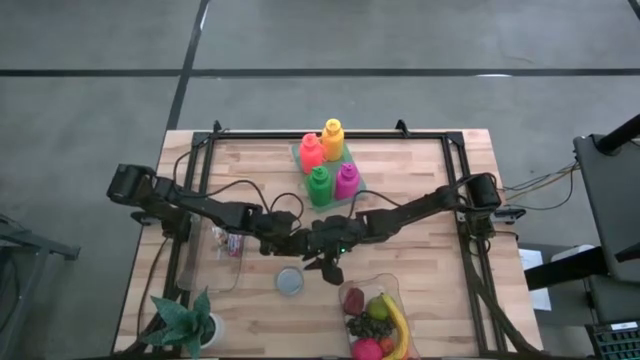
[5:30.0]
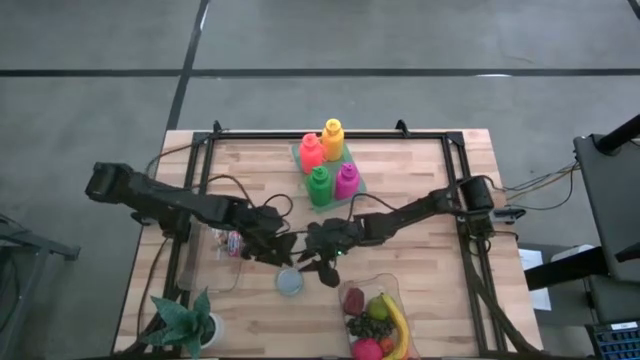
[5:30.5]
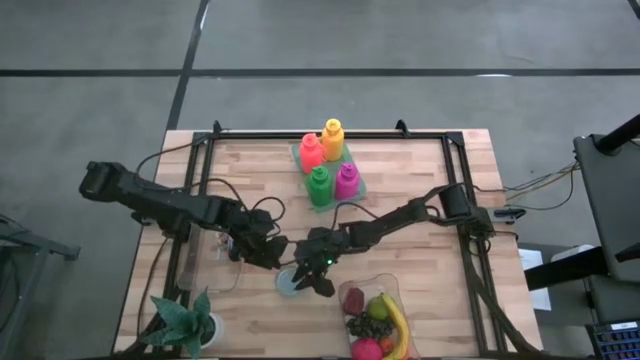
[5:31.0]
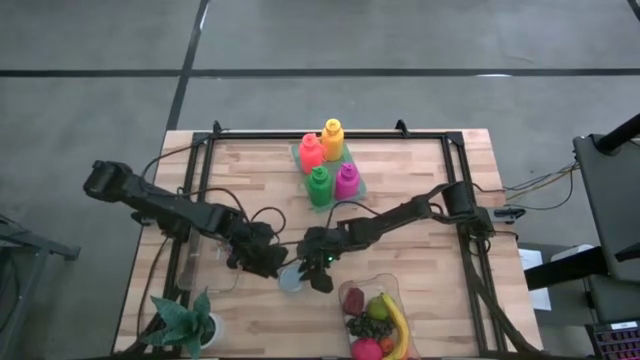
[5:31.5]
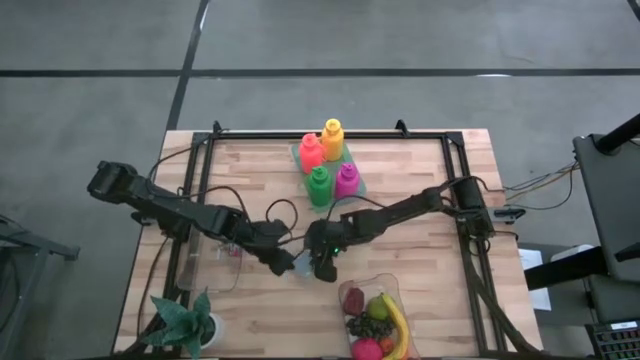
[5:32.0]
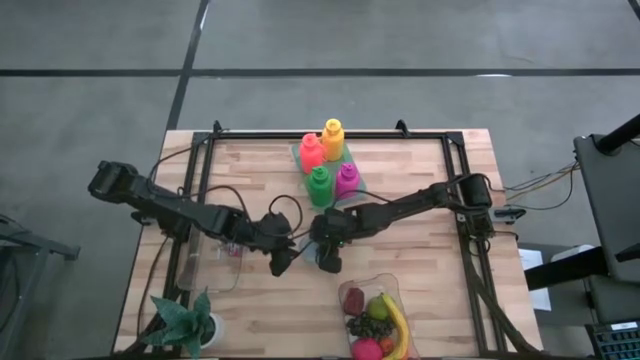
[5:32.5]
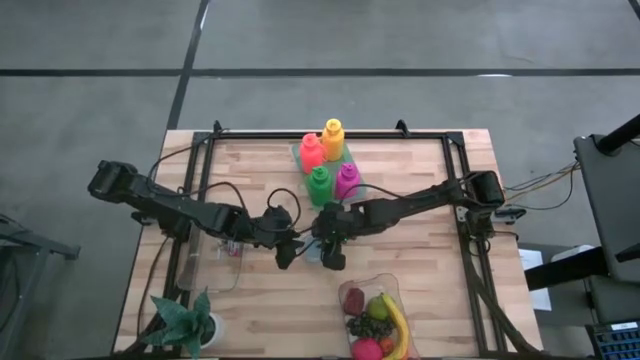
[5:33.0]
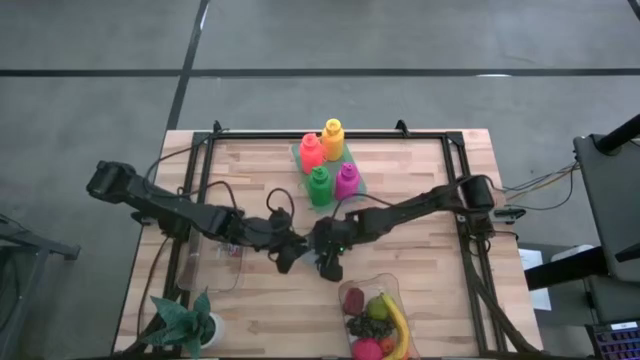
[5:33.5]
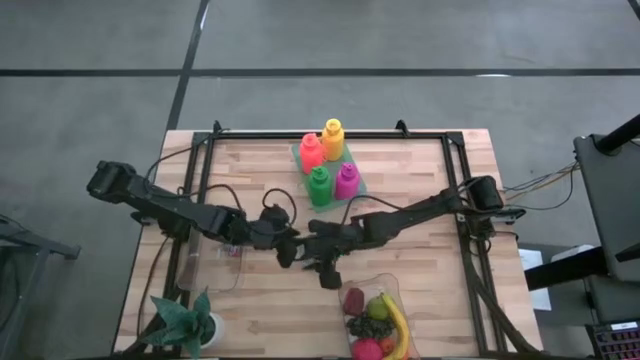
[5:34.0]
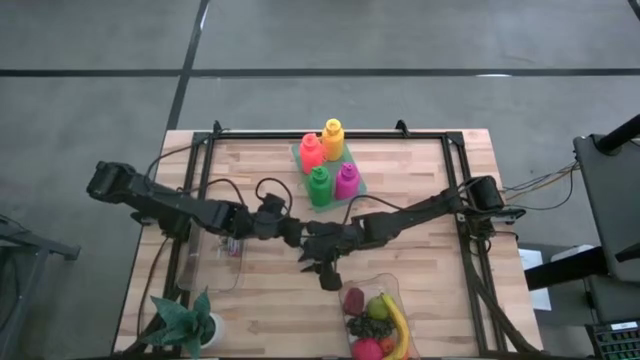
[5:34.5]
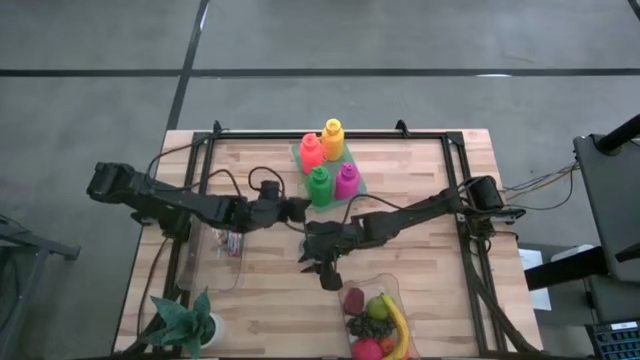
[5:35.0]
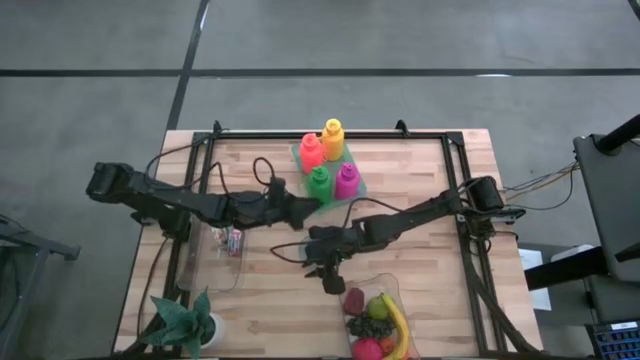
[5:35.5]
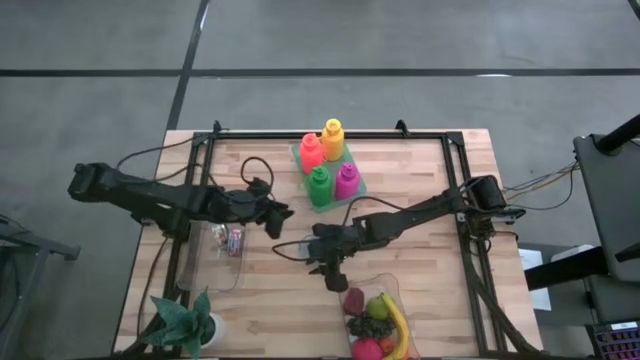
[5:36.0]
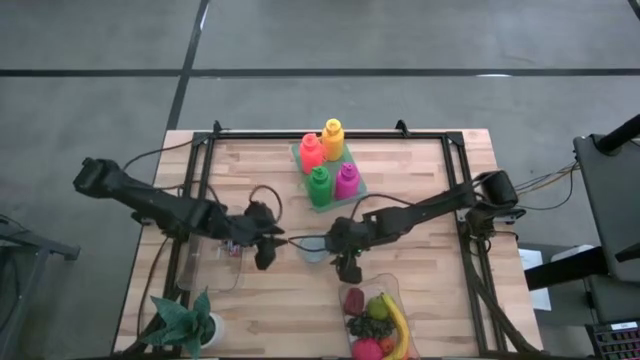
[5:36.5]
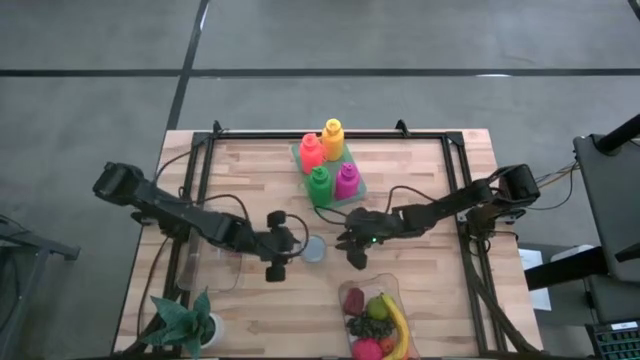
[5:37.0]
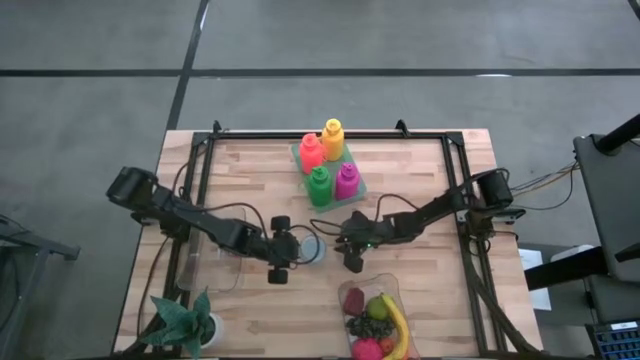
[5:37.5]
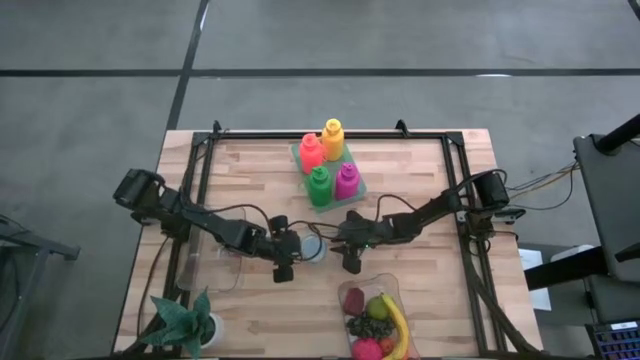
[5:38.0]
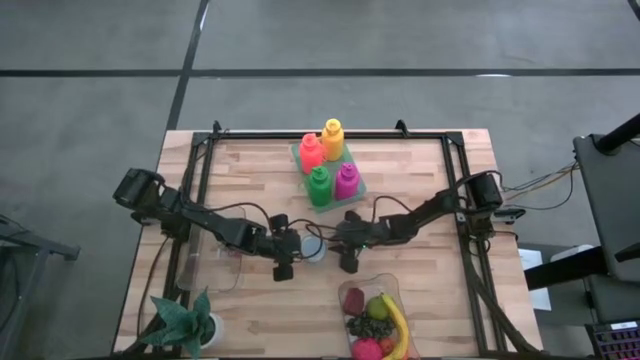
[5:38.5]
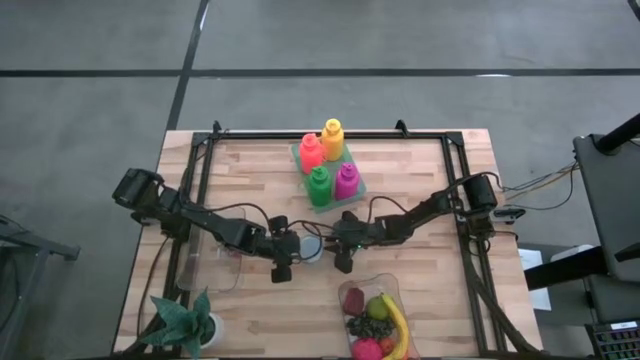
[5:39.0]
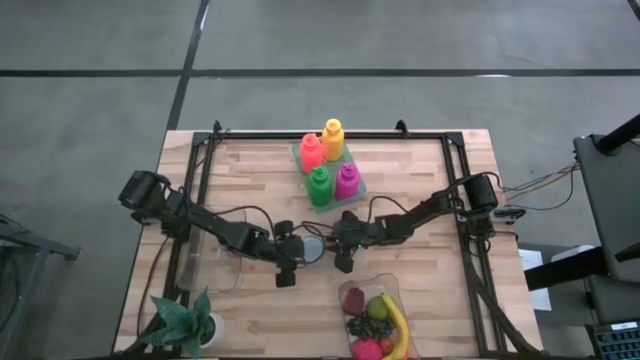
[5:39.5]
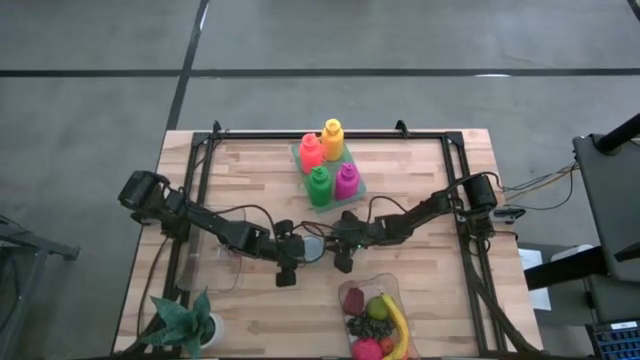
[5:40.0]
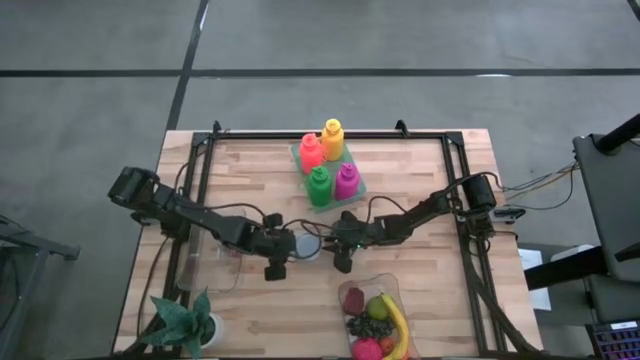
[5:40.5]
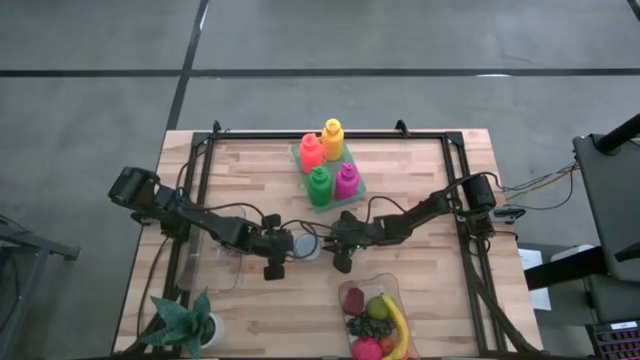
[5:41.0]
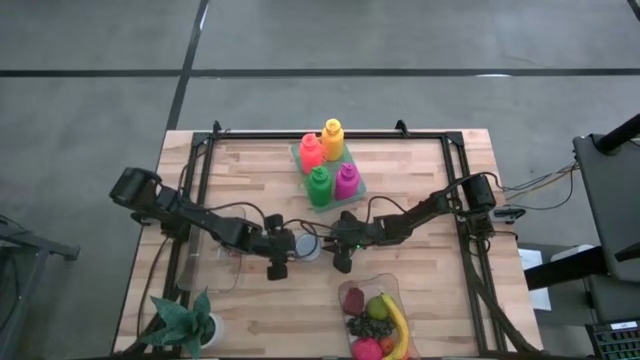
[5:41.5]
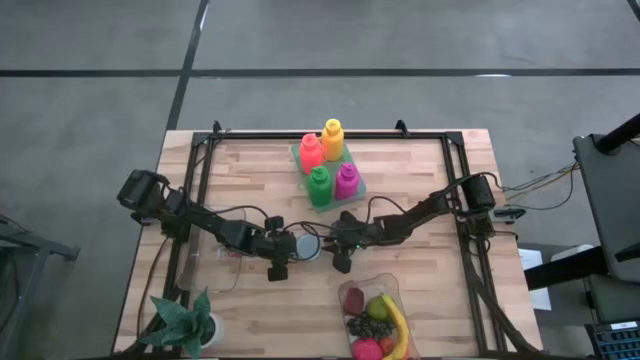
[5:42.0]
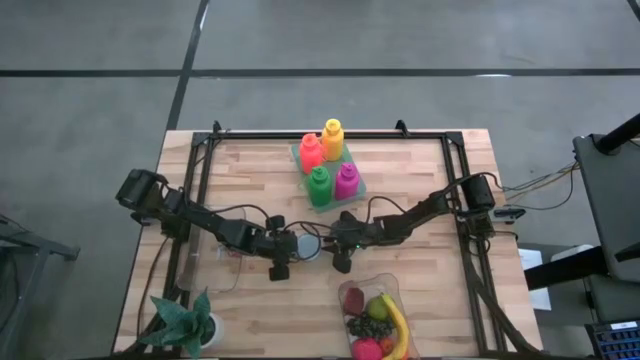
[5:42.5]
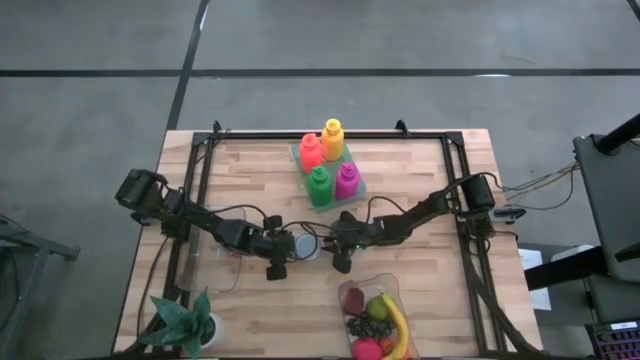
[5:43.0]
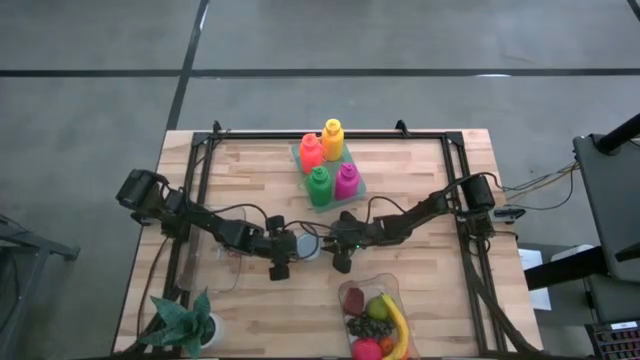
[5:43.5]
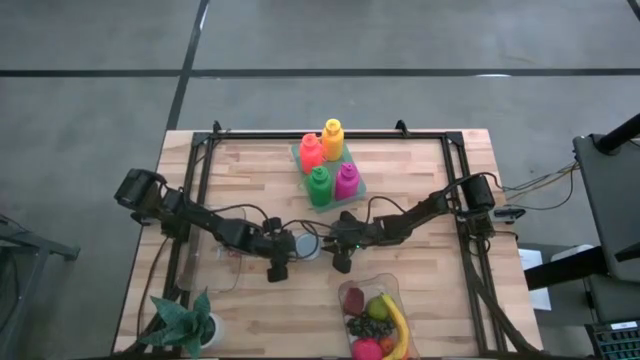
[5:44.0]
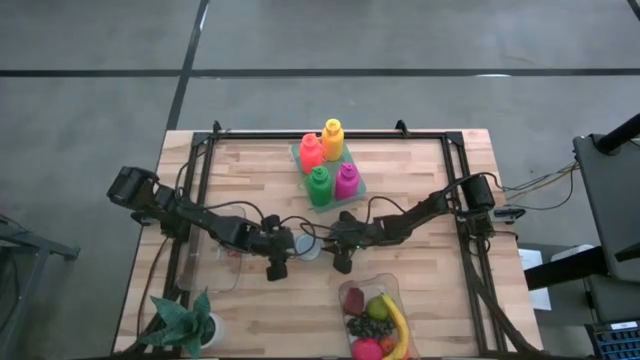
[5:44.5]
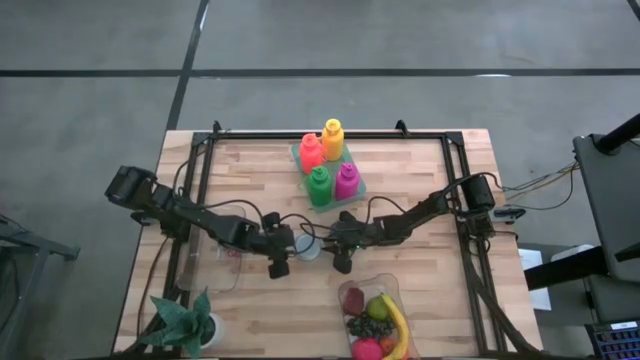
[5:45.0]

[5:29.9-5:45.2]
Task: Pick & Place Food Item
Put the green and white tuna can into the top transparent bin

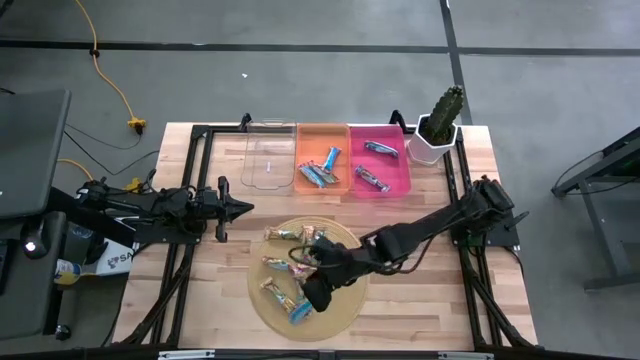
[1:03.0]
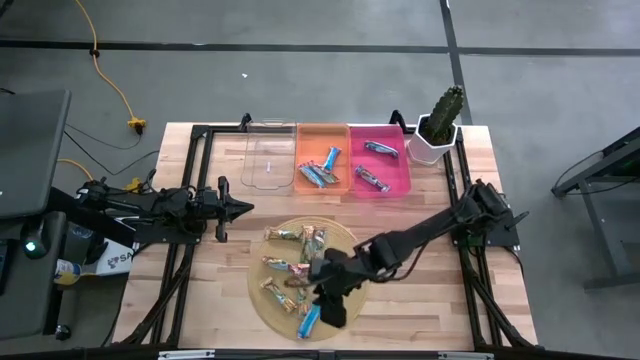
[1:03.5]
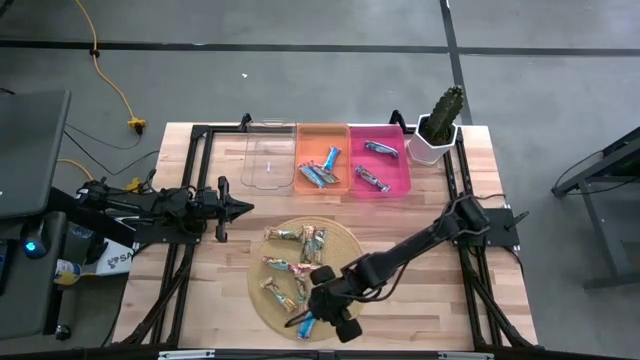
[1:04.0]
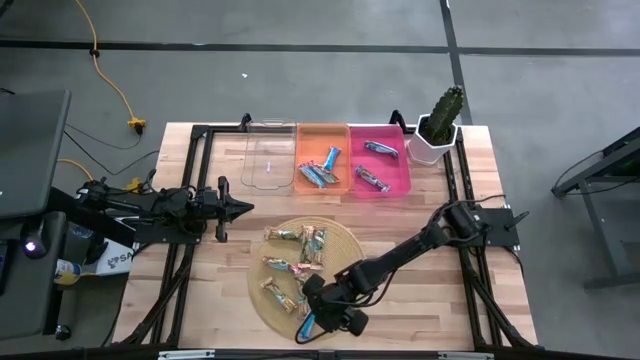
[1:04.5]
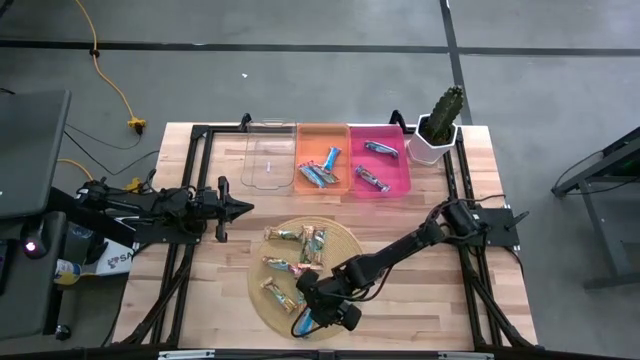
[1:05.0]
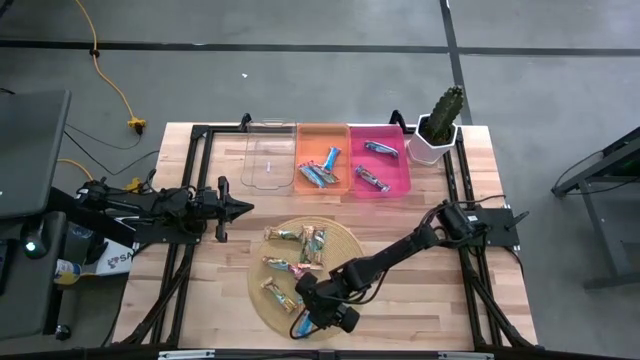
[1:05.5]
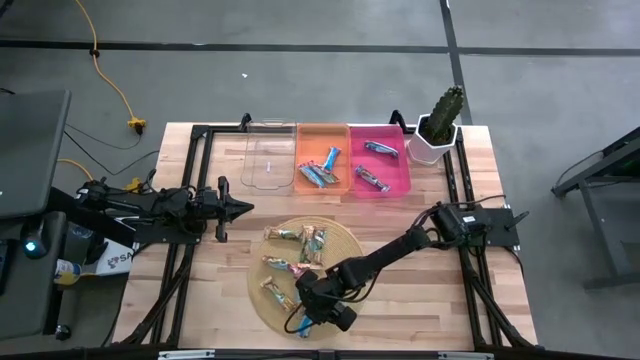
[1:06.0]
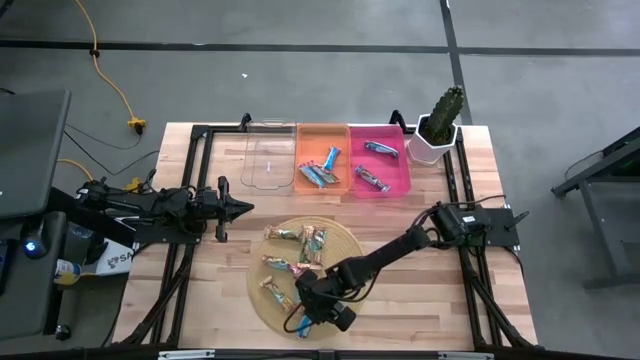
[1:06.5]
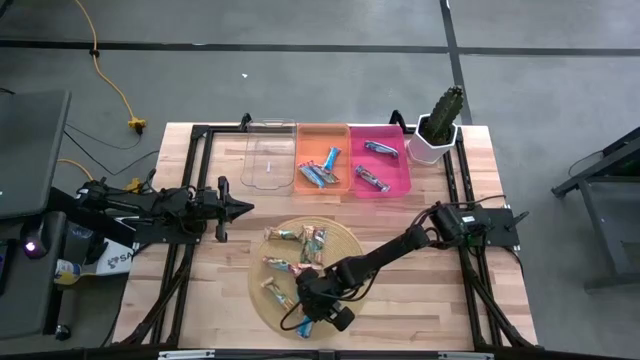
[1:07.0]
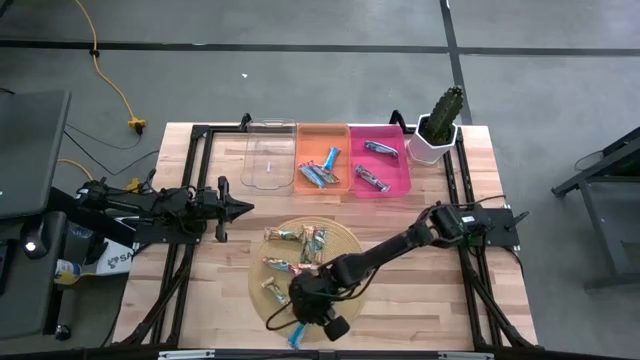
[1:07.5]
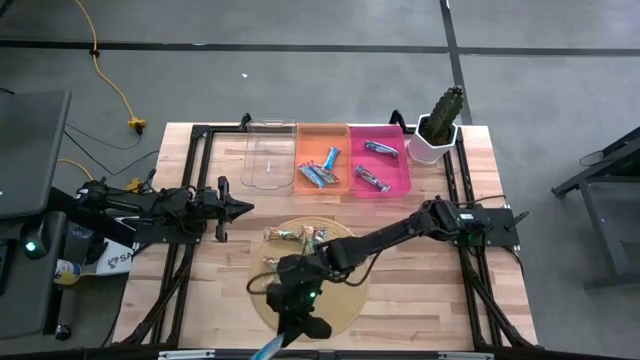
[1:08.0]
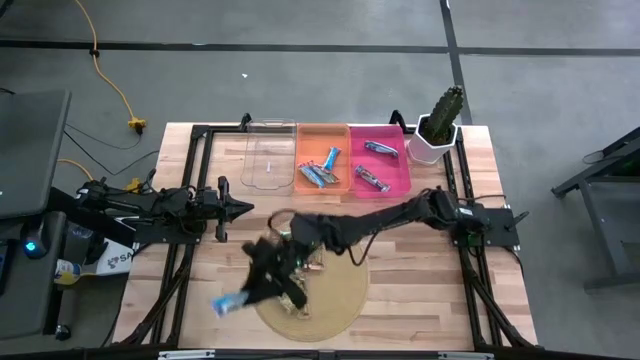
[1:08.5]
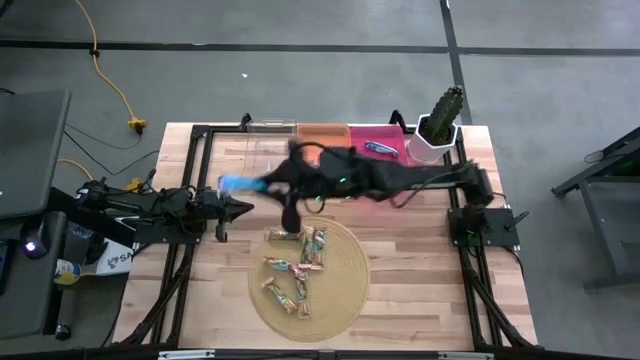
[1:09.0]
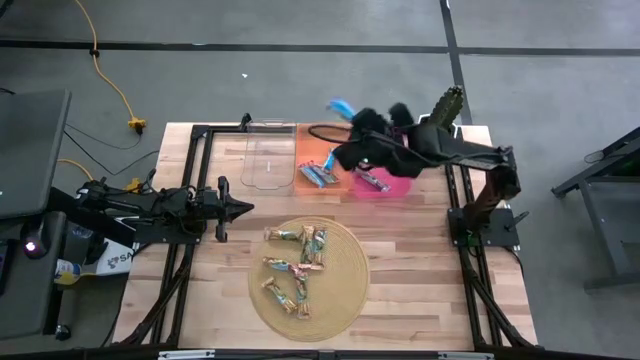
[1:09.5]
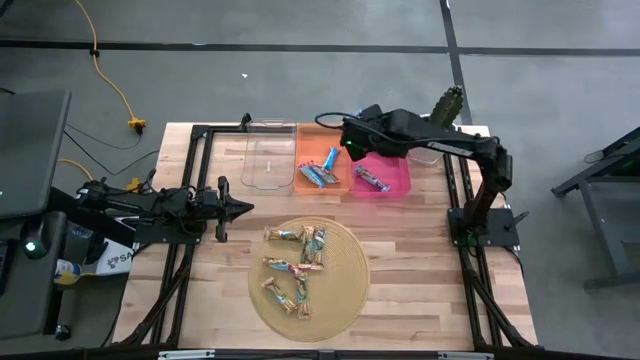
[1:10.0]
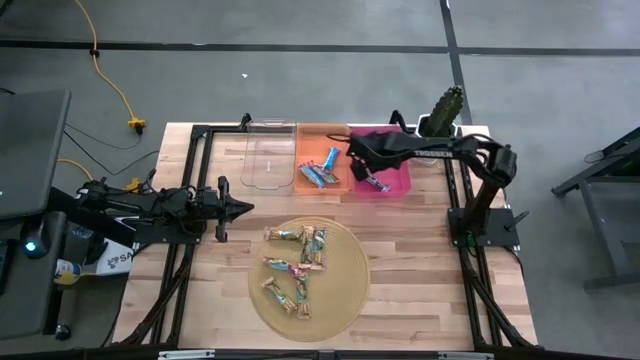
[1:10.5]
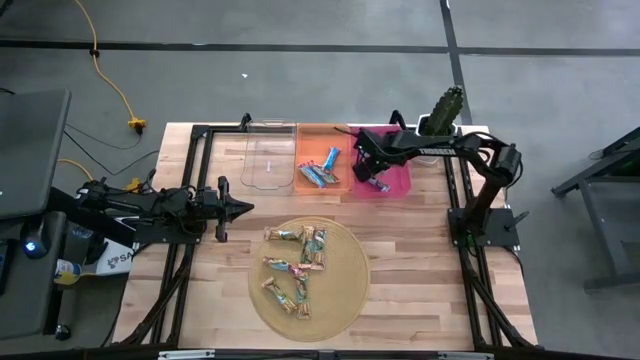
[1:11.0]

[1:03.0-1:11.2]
Task: Pick and place Granola Bars by type
Put the blue granola bar into the pink bin
